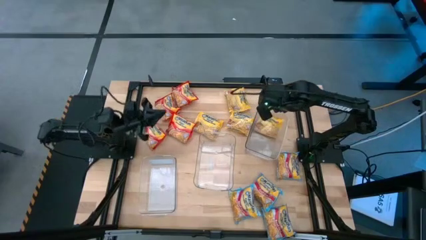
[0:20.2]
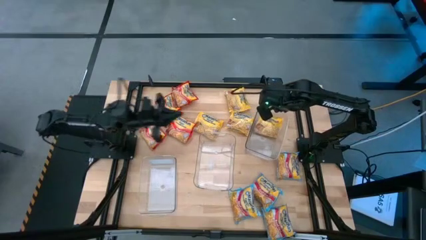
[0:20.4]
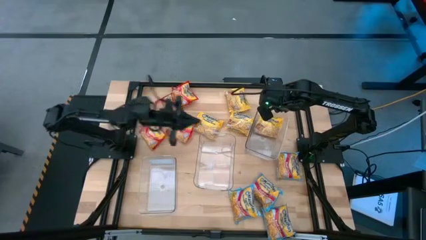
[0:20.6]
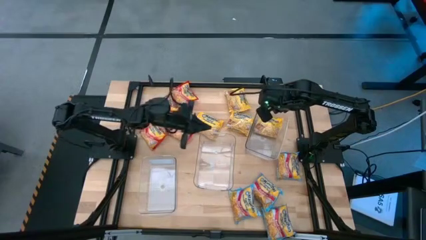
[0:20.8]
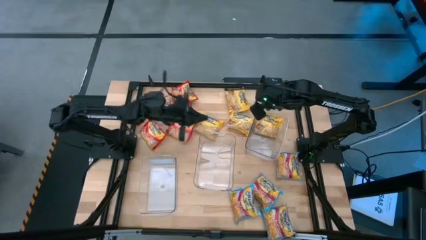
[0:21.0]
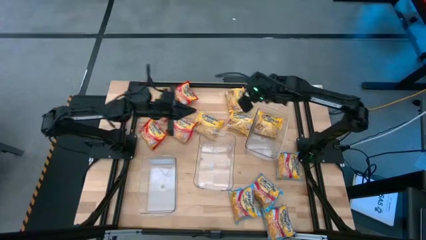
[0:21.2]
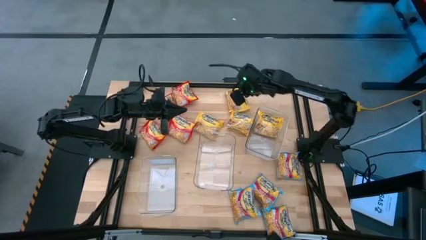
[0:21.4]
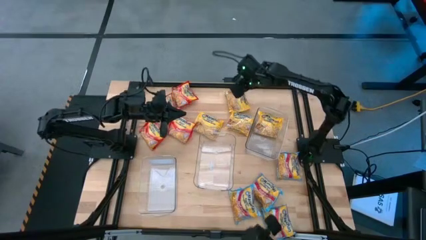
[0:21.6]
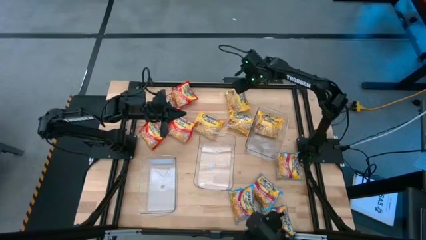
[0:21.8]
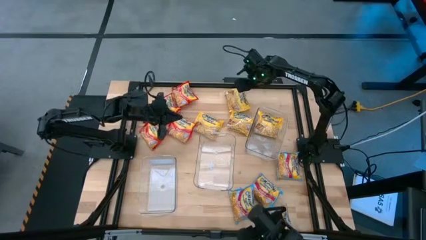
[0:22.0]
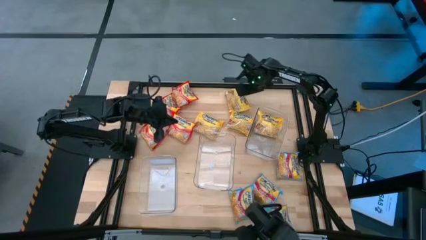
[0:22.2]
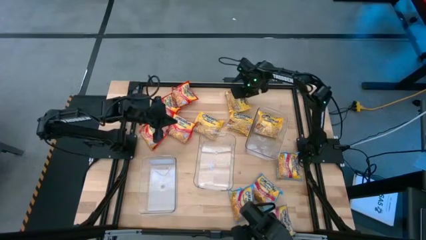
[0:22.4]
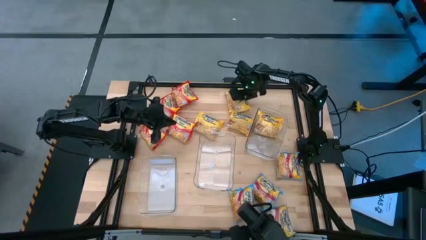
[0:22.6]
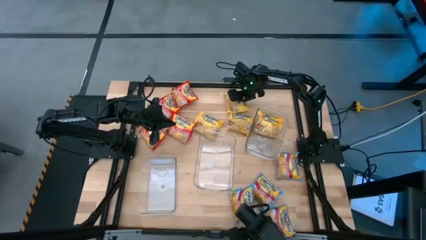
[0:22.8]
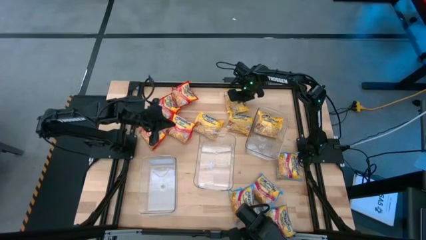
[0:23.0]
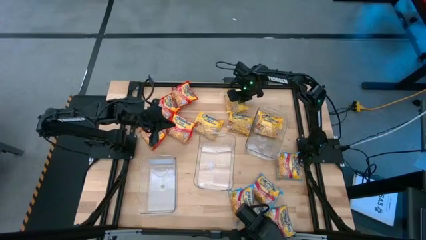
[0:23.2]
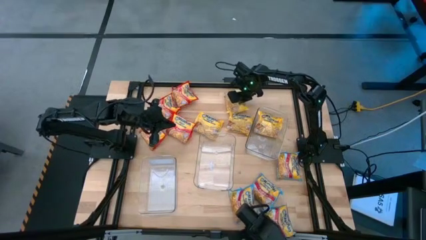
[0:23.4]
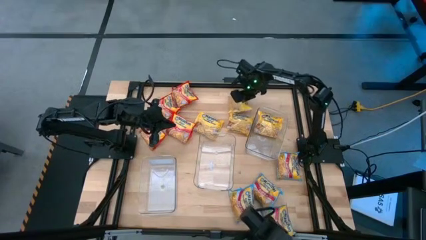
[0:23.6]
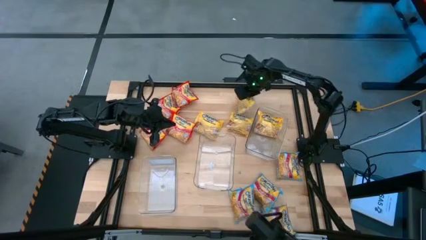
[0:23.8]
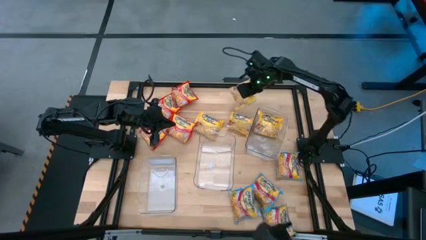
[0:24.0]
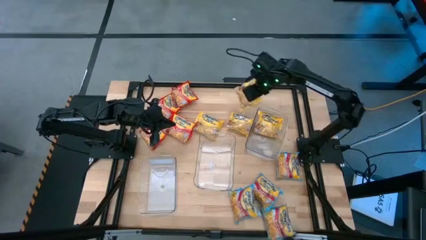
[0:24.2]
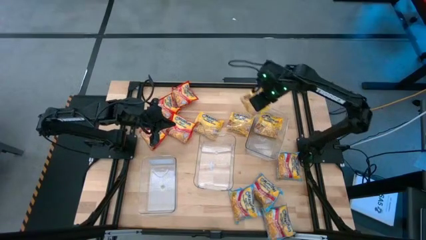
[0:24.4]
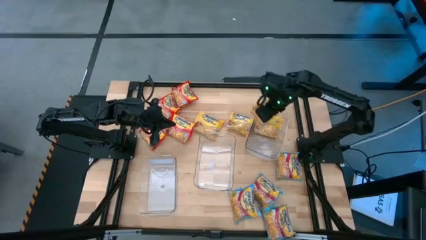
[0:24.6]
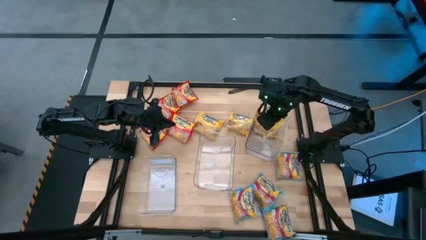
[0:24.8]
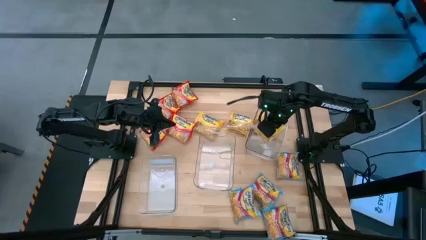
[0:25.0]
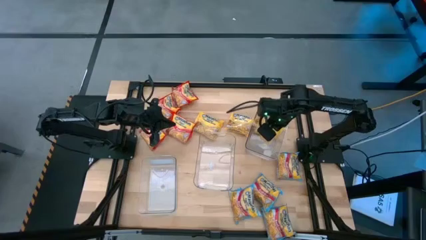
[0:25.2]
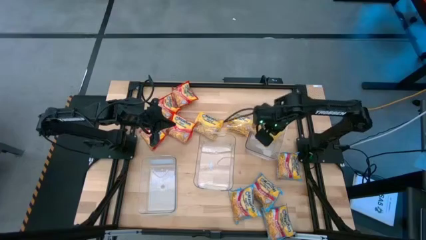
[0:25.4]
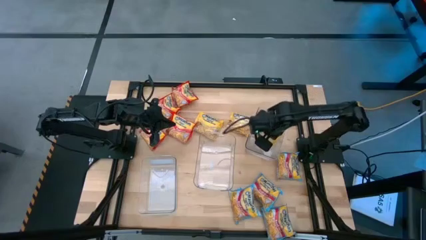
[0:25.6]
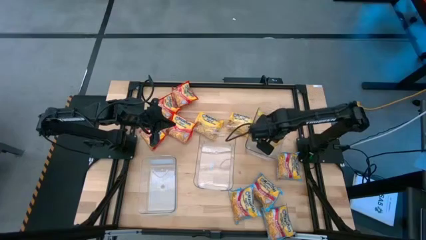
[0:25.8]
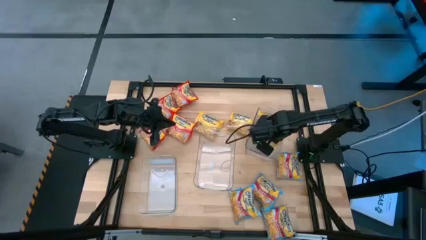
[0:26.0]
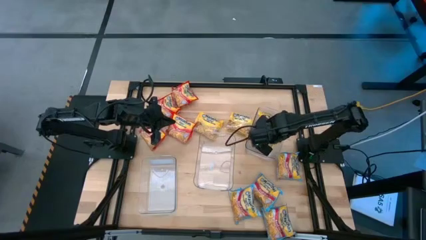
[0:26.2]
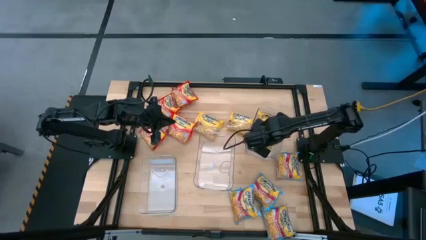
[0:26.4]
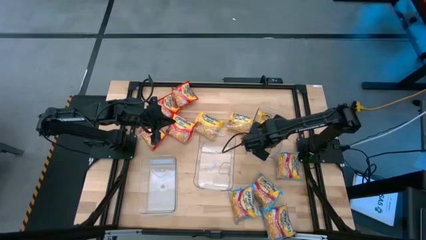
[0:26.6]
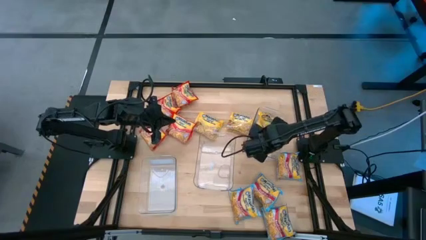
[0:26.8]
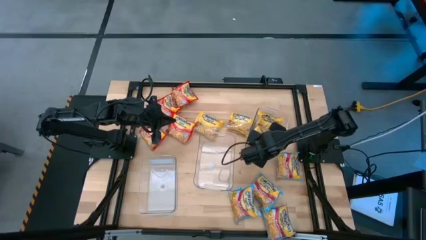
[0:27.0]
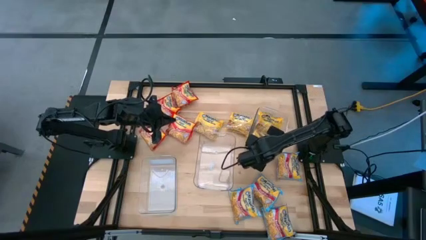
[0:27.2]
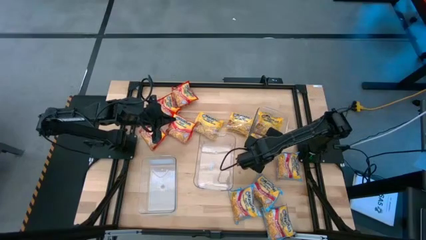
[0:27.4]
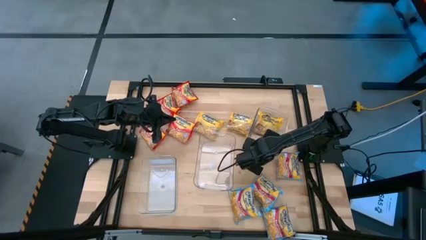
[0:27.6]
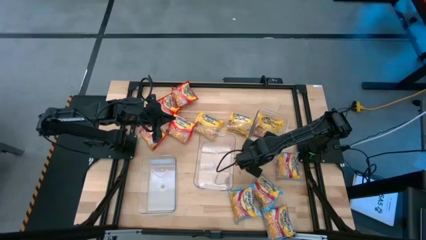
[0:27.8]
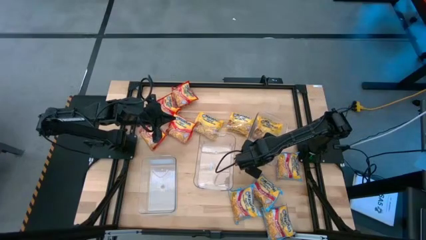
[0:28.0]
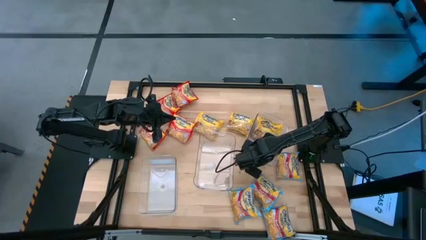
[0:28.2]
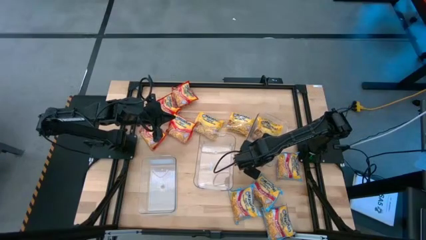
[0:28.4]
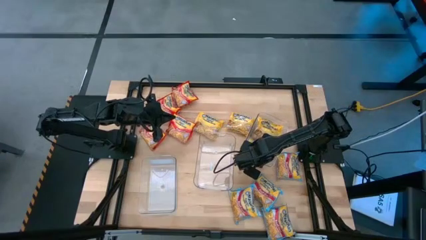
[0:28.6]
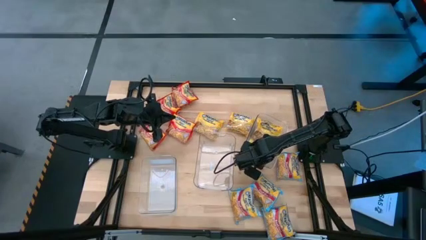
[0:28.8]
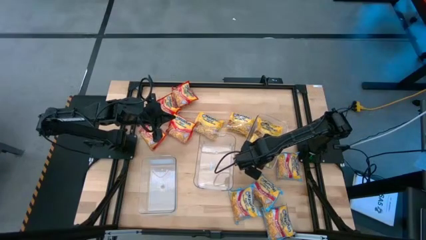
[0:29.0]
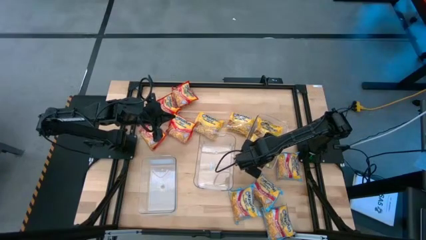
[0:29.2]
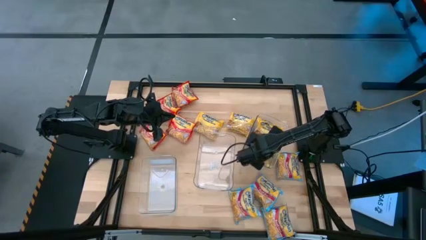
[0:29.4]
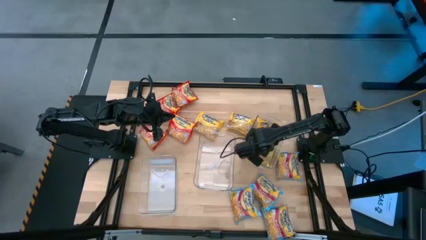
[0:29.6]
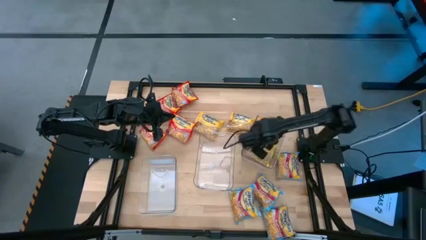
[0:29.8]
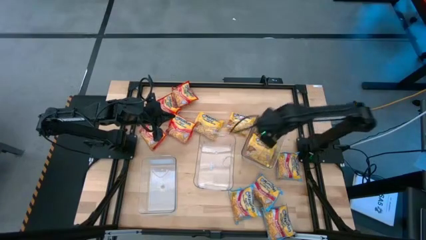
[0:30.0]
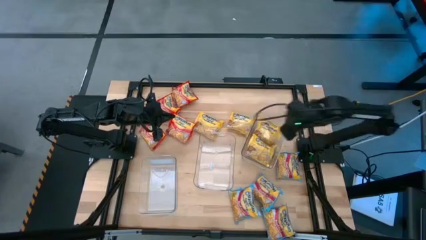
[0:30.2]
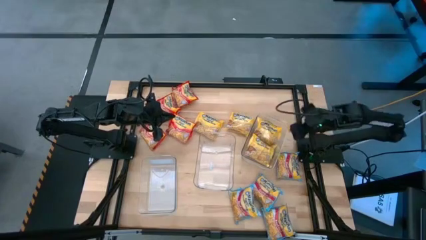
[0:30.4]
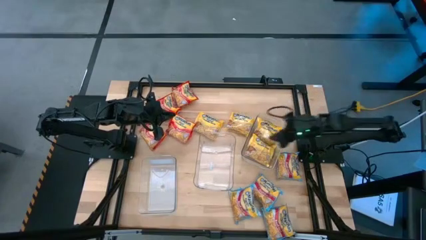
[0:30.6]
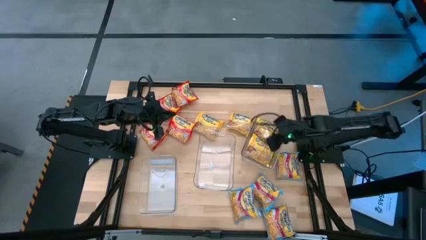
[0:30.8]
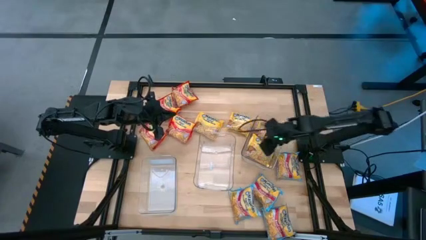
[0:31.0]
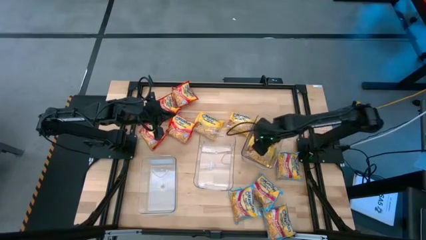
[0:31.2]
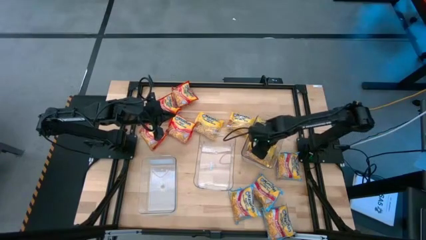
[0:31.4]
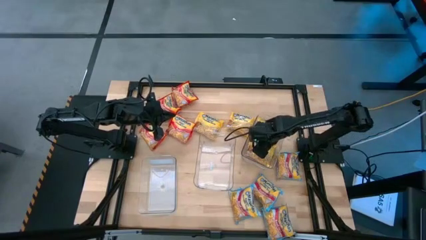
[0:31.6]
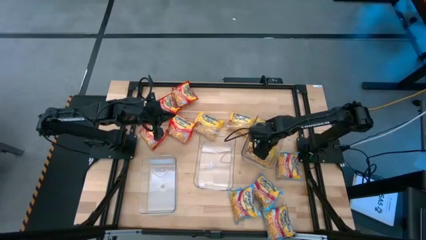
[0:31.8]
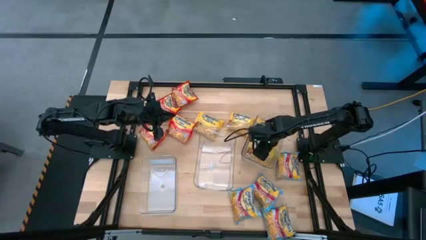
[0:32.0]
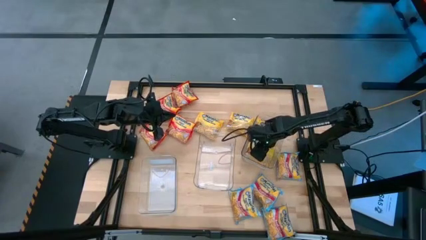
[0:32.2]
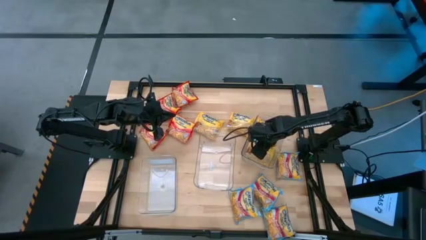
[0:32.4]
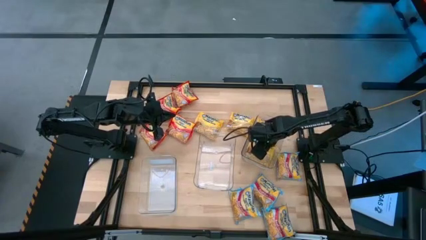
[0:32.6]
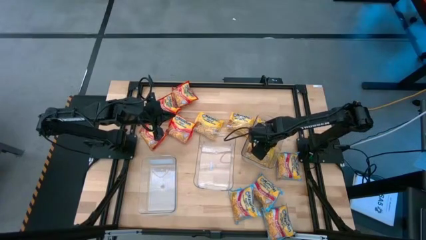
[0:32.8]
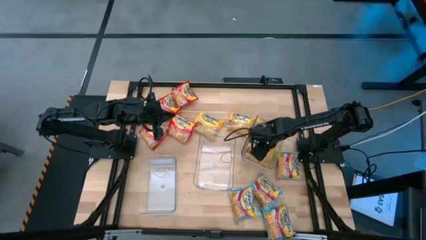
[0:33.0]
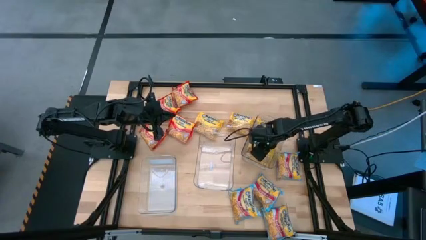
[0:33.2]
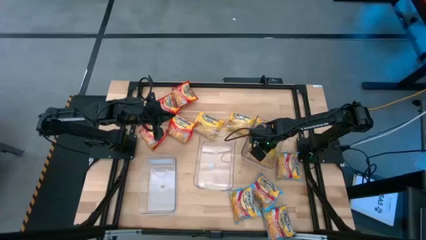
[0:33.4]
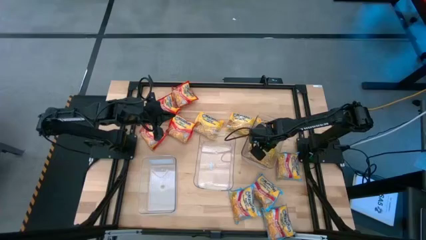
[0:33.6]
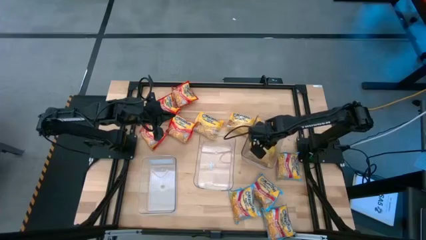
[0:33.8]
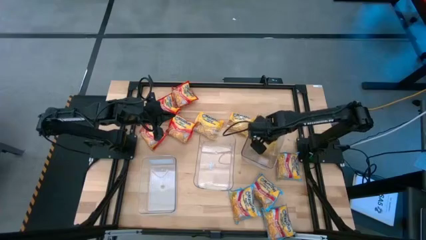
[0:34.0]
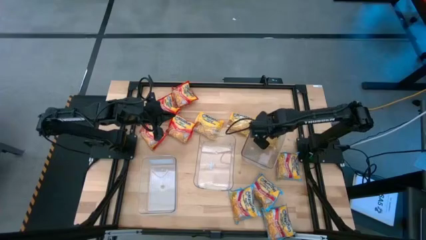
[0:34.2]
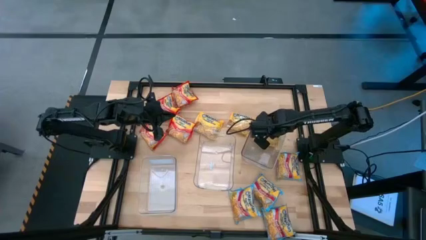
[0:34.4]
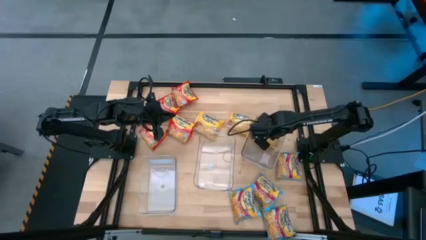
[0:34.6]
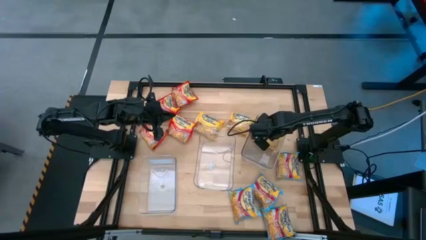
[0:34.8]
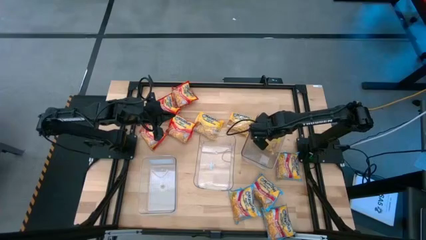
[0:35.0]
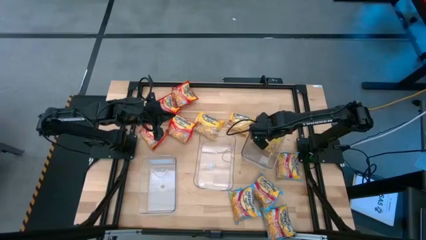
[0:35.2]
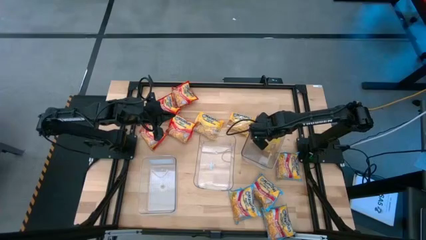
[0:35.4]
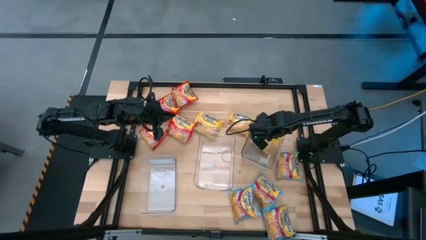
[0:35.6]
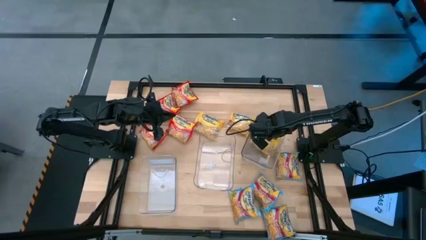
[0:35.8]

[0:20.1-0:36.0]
Task: Sort Maruchan noodles
Put the yellow noodle pack into the right transparent bin
